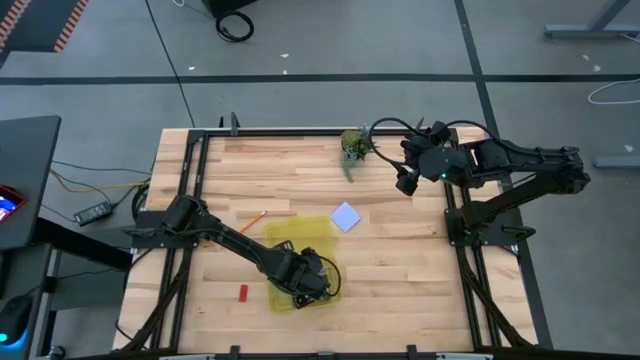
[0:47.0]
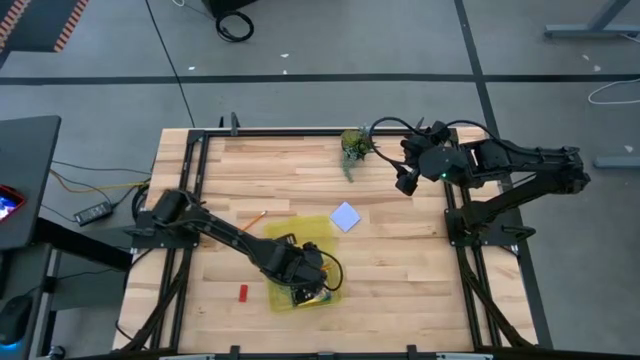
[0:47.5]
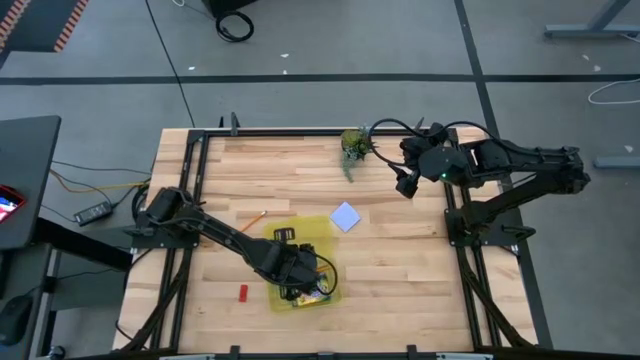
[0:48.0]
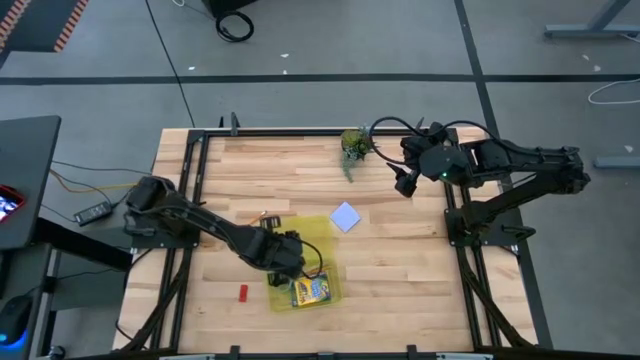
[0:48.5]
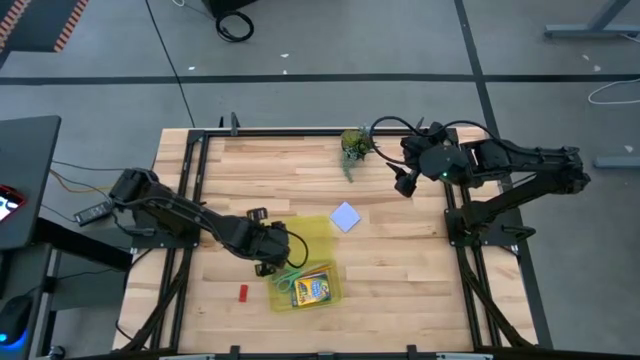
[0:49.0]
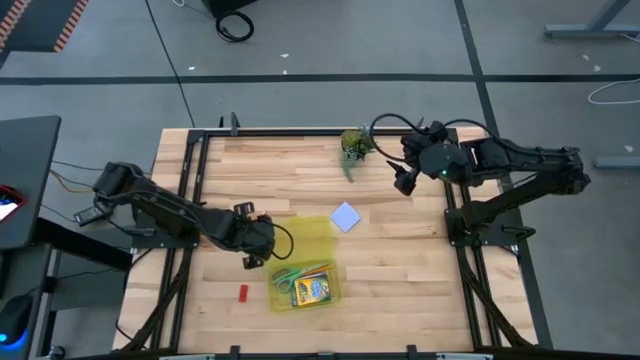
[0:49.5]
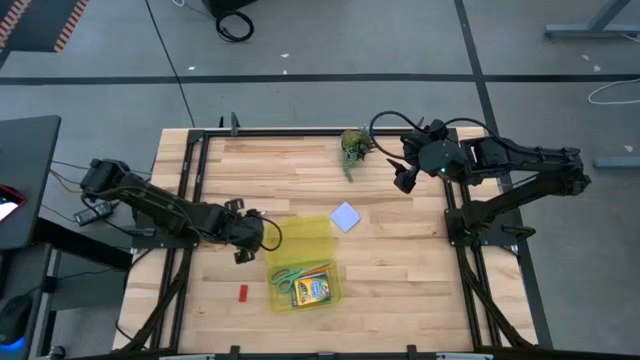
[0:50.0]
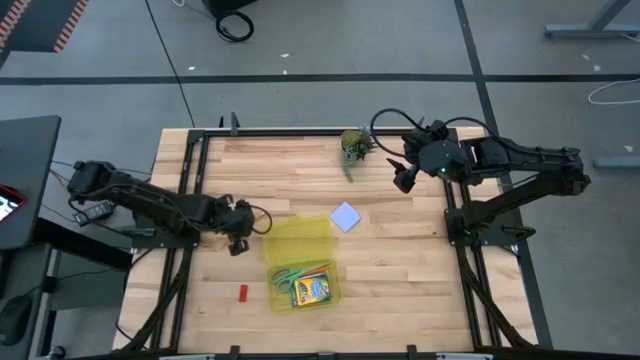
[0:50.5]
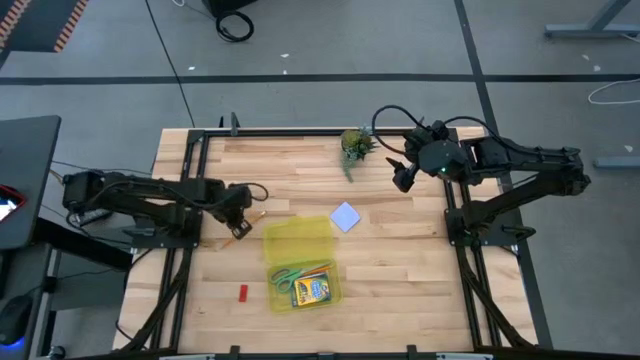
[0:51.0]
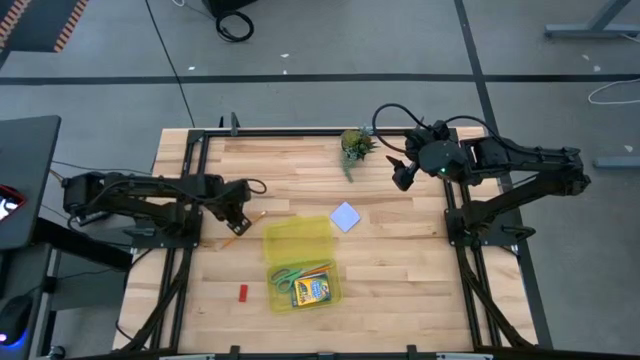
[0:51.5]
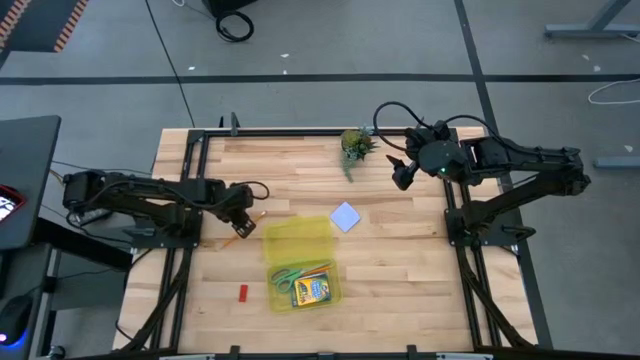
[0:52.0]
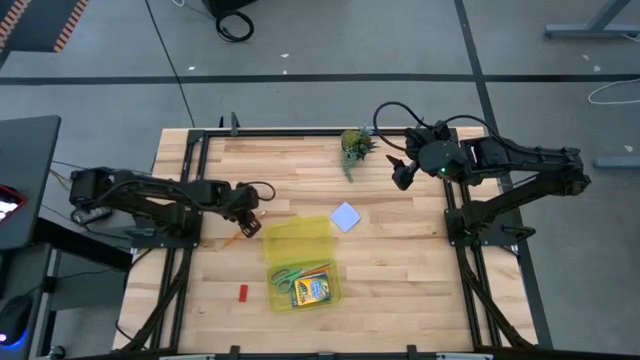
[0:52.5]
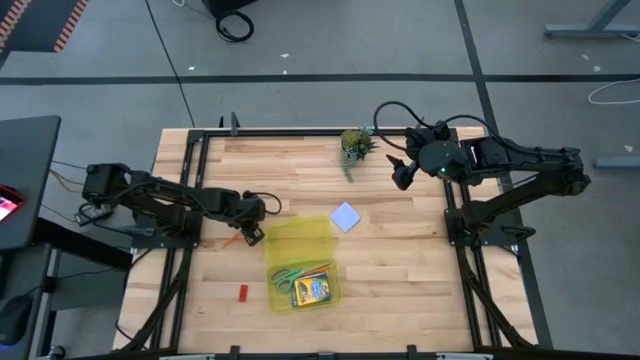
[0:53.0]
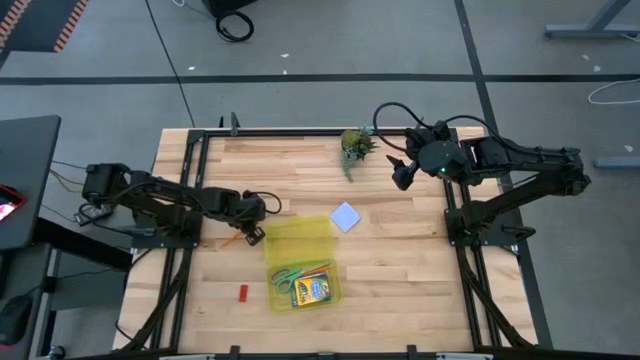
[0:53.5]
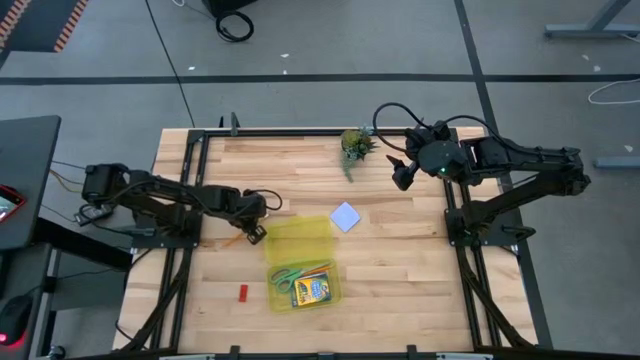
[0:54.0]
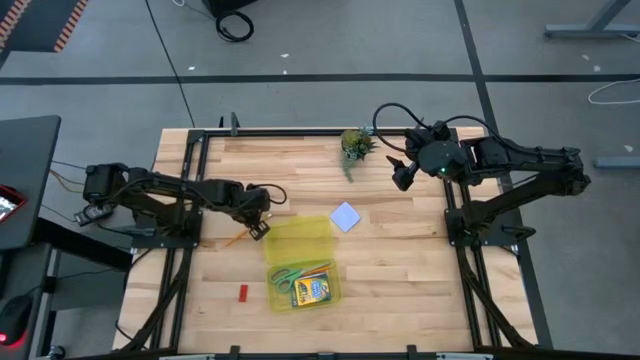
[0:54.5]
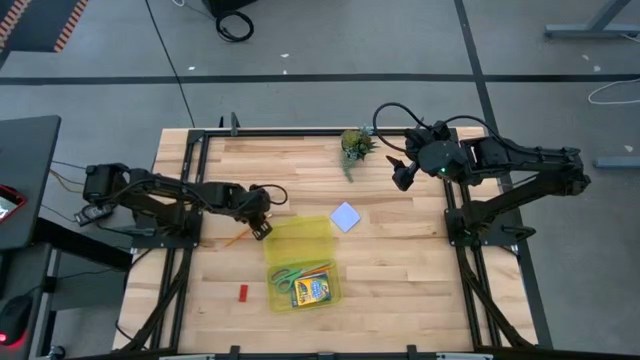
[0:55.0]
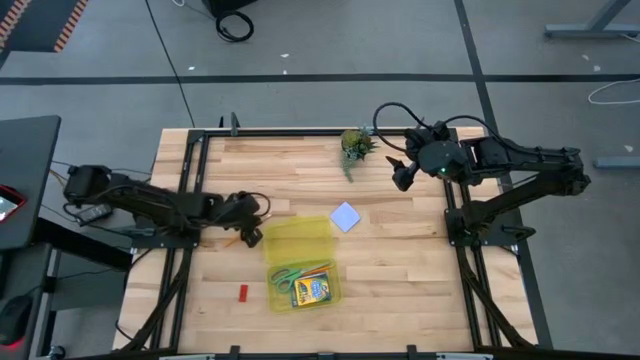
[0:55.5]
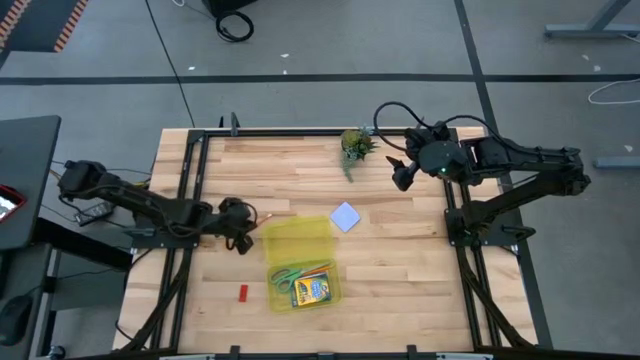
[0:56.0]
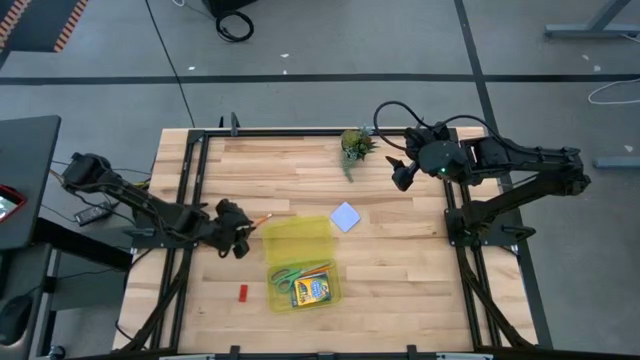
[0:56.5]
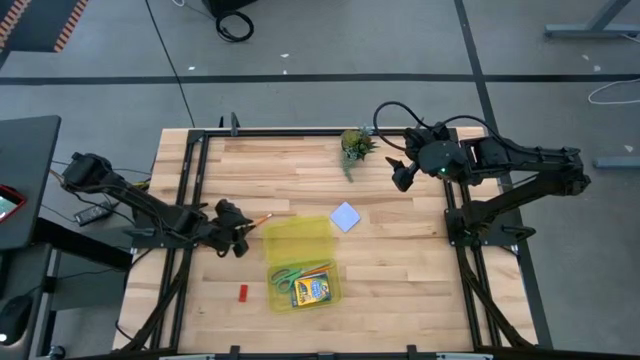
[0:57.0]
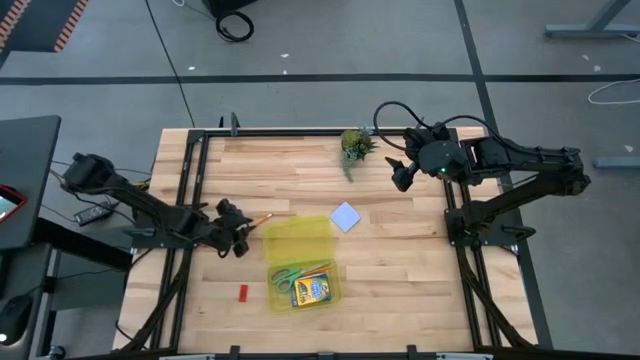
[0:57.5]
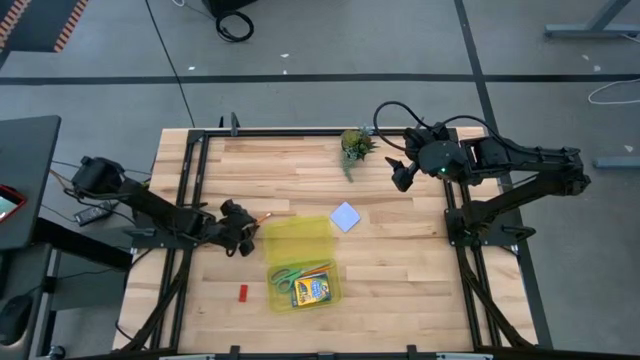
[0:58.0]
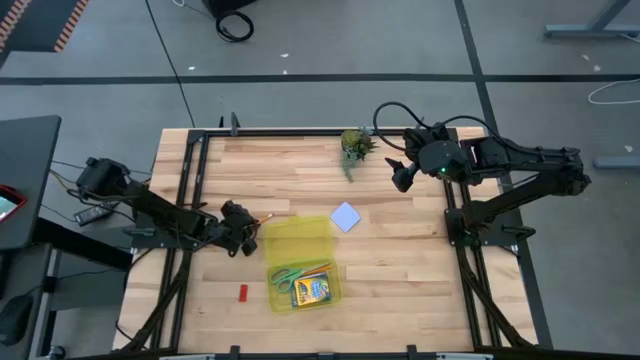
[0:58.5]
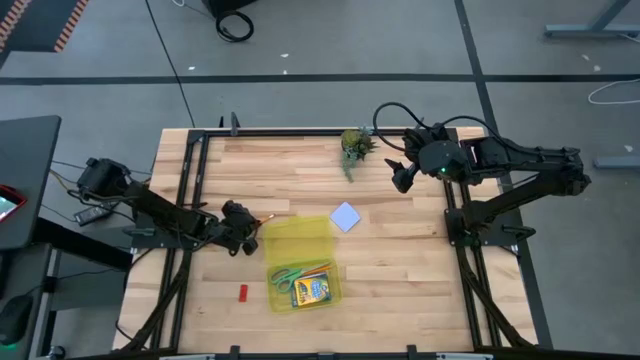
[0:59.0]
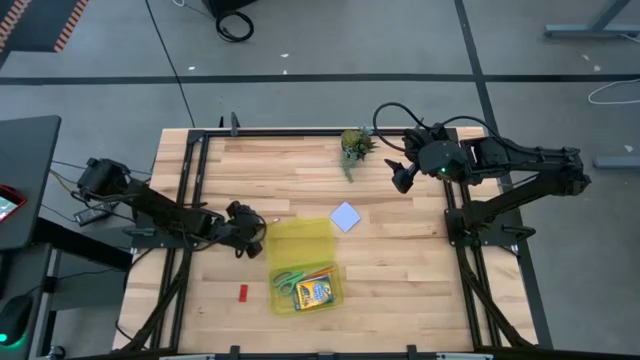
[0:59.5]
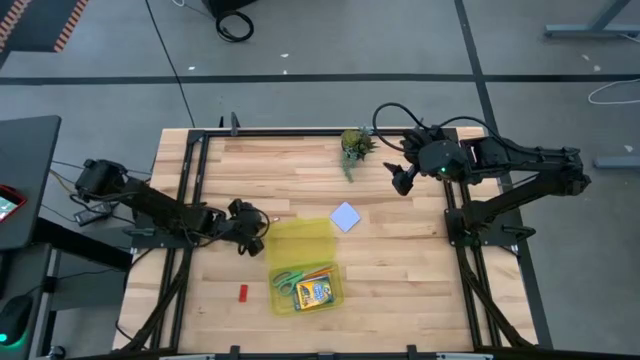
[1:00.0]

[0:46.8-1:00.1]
Task: Pack school essentials
Put the orange pencil into the yellow supply box

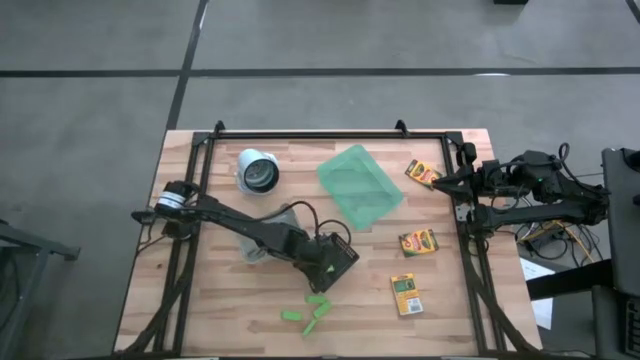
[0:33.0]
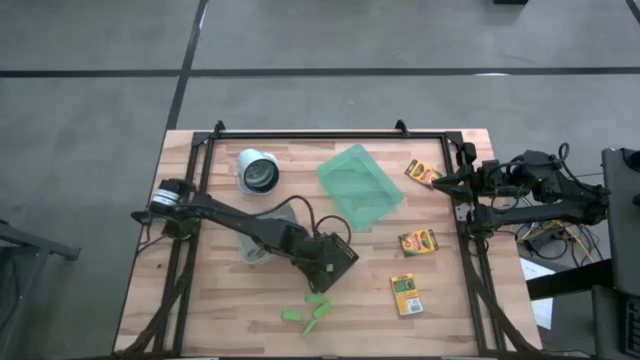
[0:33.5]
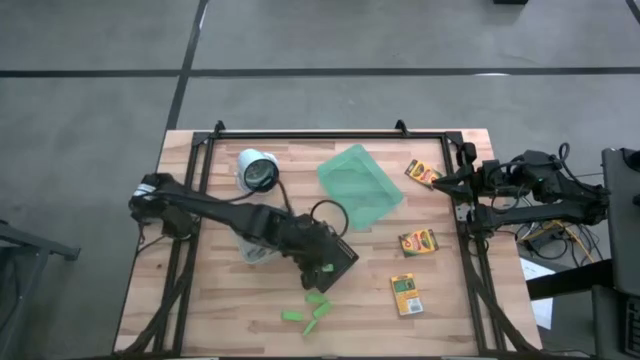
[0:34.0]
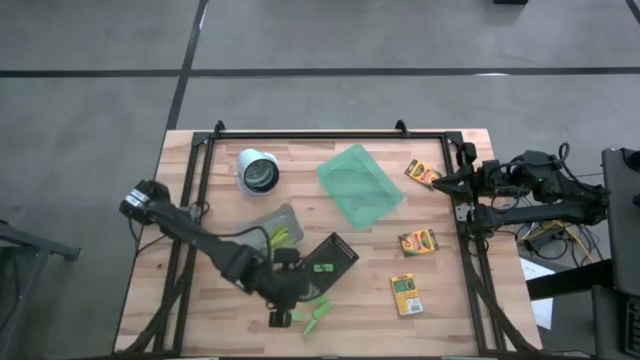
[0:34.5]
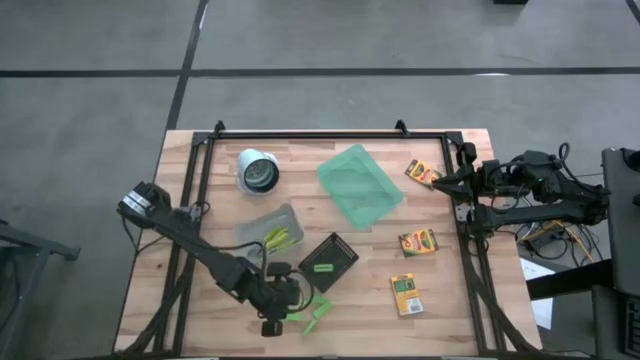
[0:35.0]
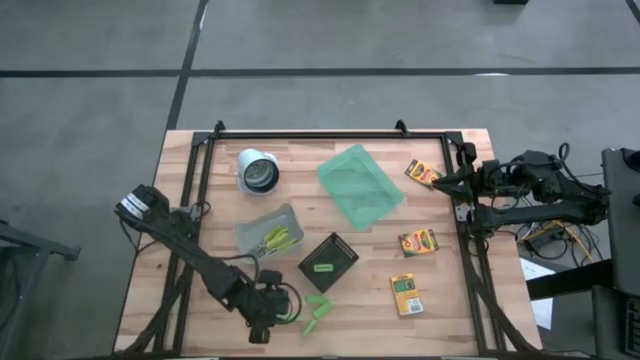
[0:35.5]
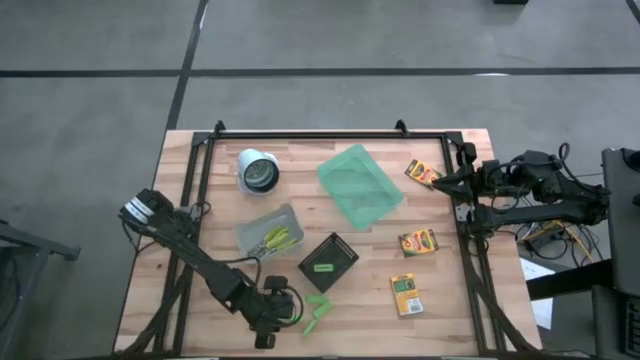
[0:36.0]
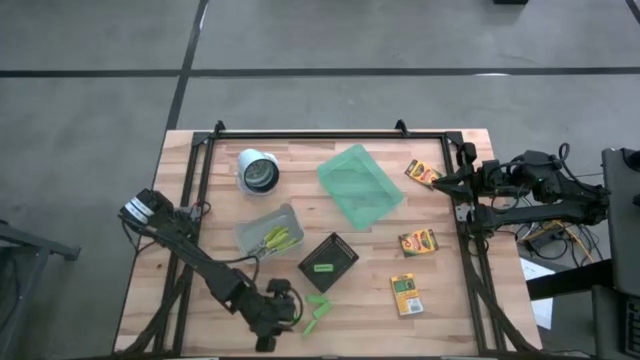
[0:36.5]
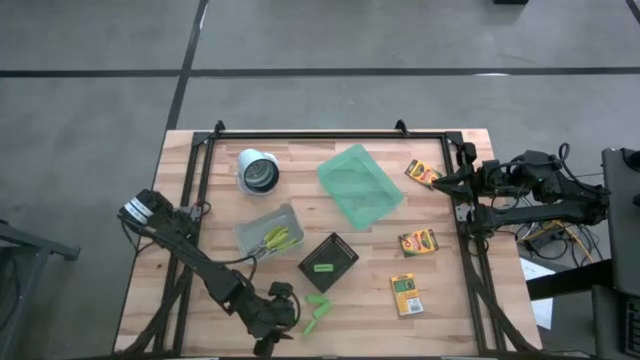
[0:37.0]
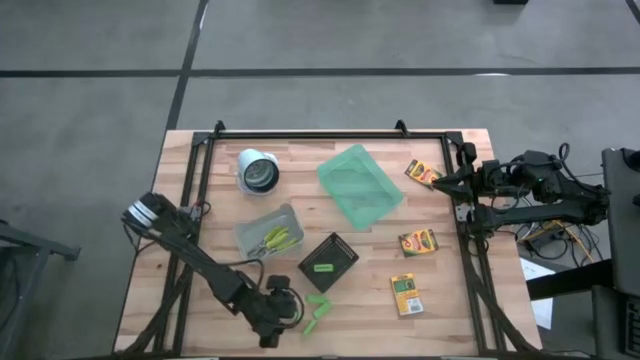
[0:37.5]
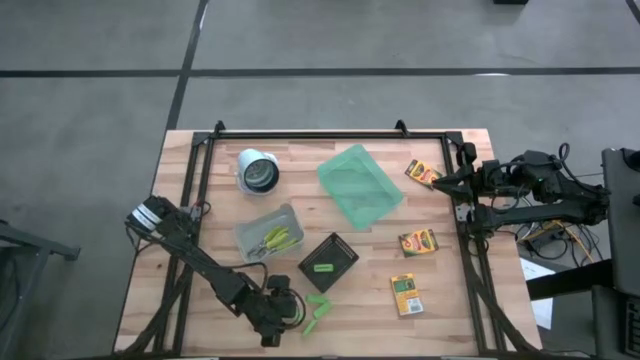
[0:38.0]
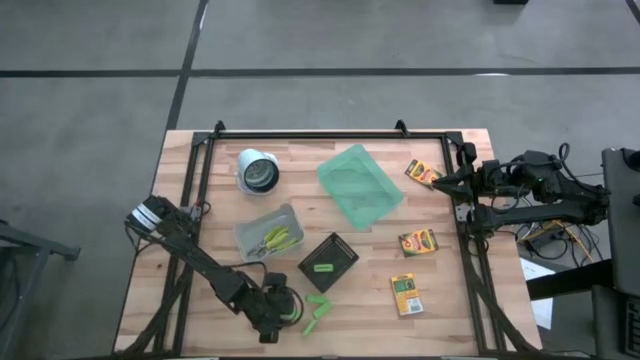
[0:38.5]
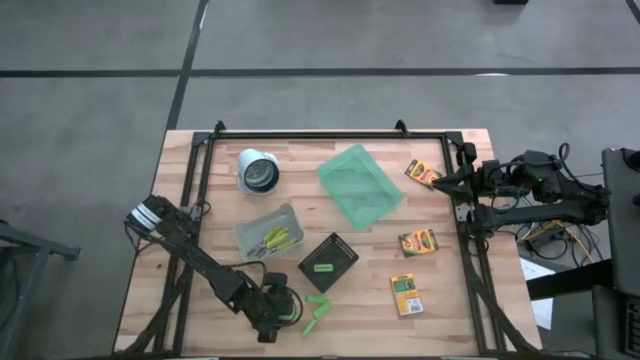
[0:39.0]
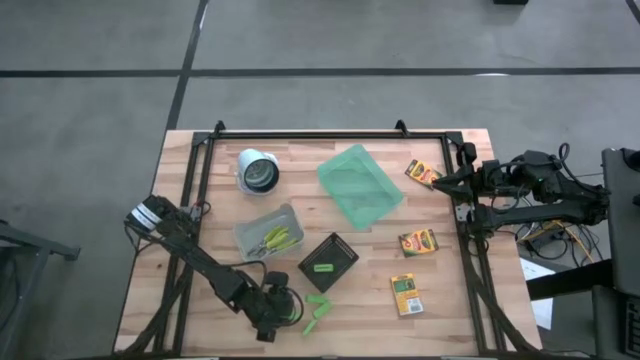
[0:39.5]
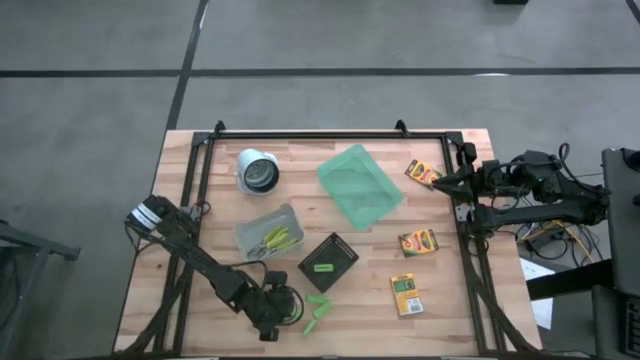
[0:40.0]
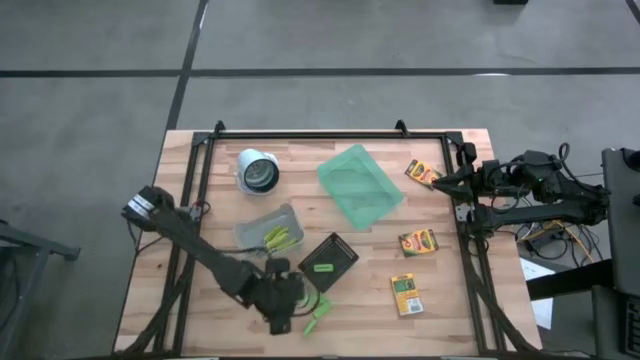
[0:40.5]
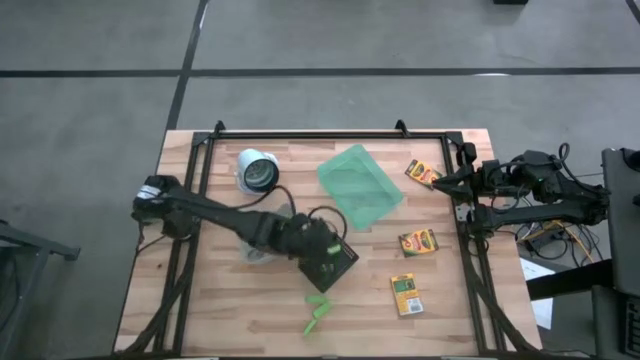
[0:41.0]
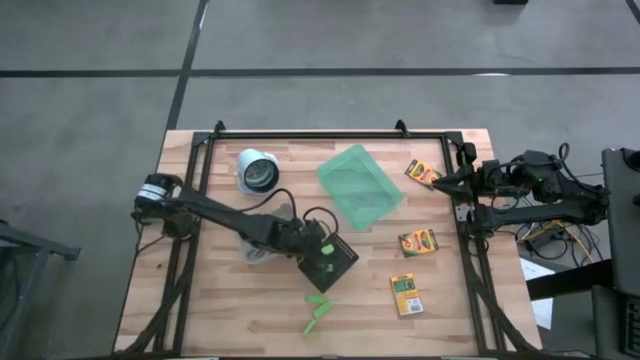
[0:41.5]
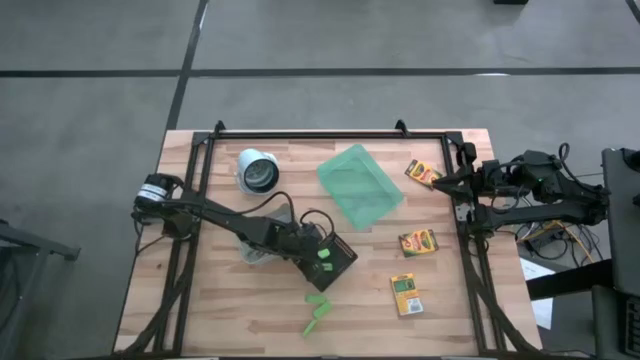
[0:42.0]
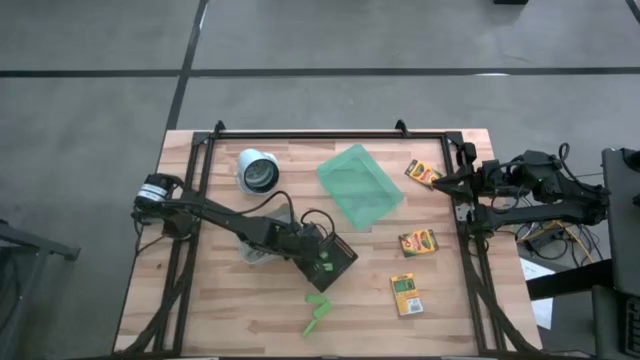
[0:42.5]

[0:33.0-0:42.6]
Task: Pick & Place School Supplies
Put the green eraser into the black bin
